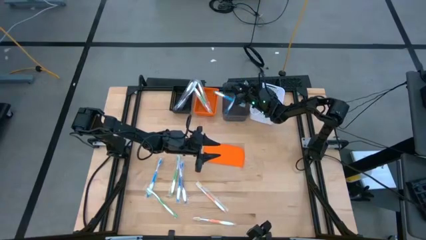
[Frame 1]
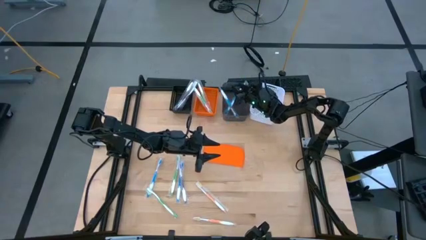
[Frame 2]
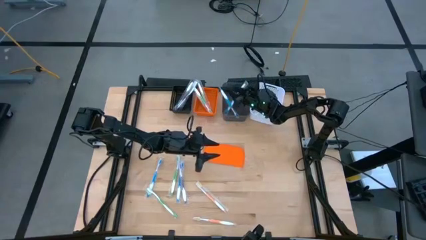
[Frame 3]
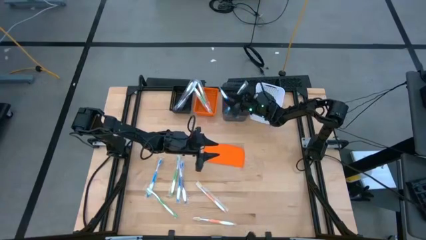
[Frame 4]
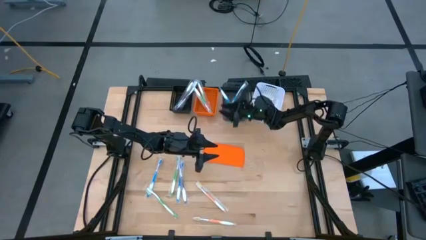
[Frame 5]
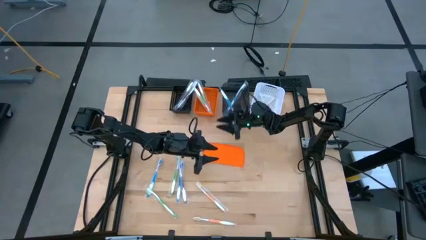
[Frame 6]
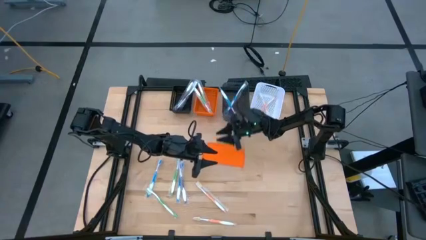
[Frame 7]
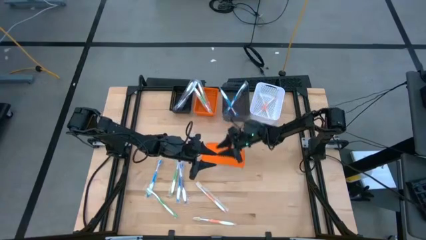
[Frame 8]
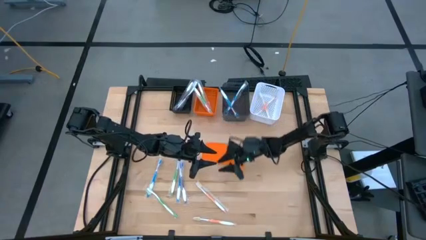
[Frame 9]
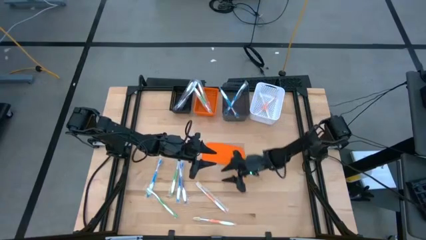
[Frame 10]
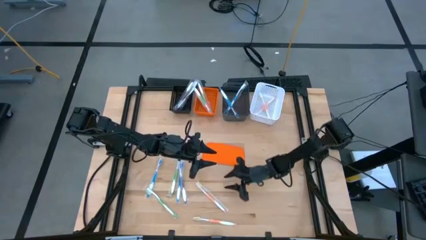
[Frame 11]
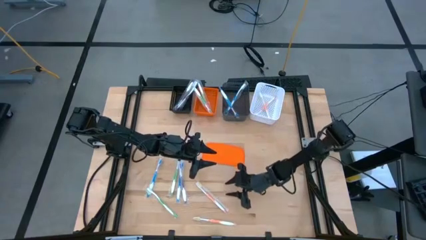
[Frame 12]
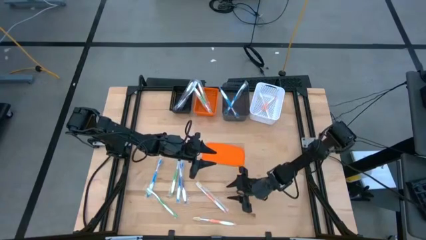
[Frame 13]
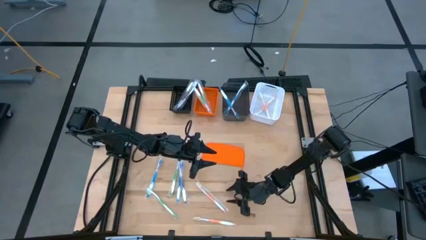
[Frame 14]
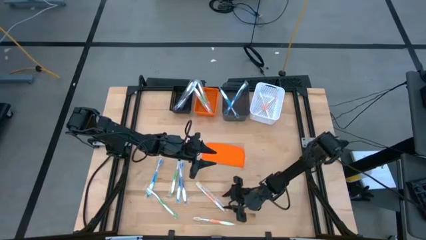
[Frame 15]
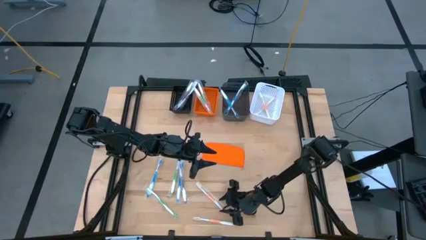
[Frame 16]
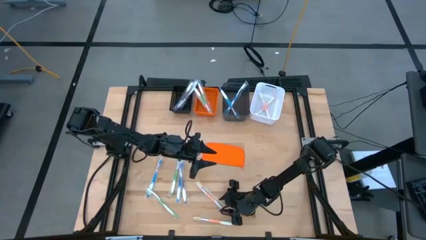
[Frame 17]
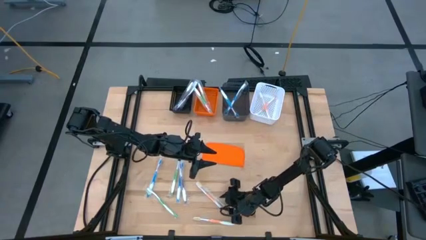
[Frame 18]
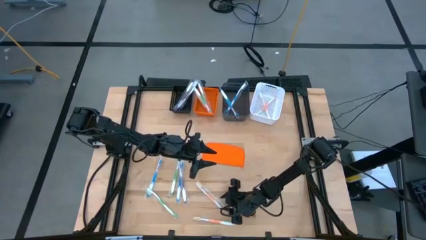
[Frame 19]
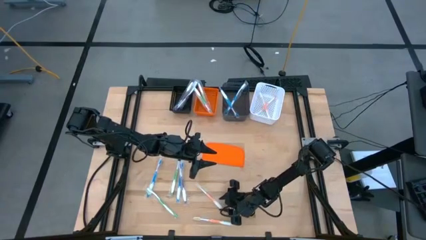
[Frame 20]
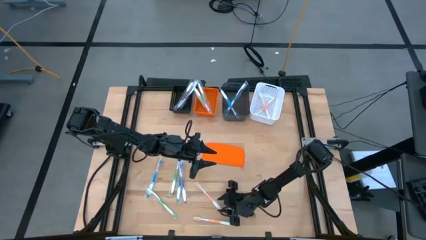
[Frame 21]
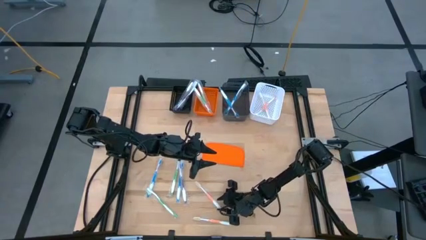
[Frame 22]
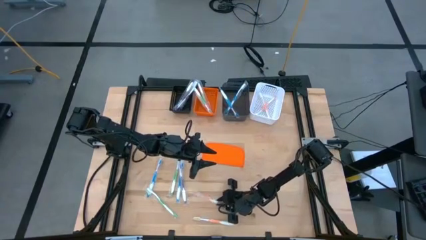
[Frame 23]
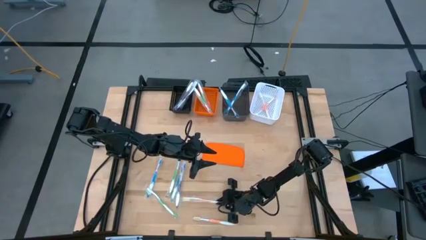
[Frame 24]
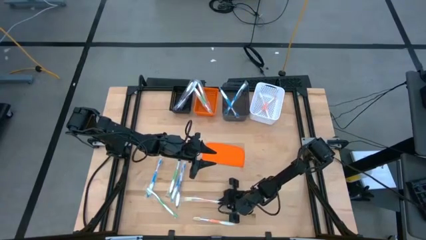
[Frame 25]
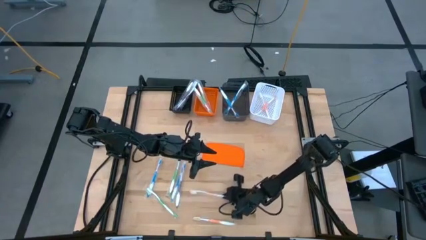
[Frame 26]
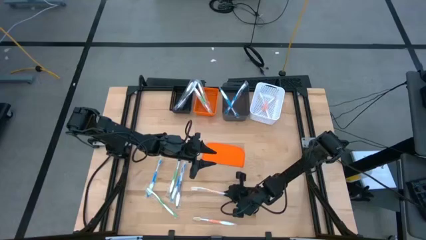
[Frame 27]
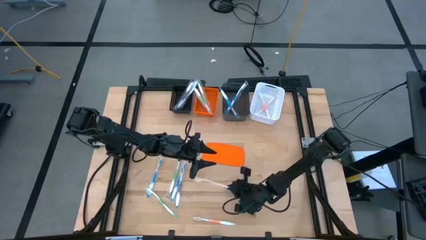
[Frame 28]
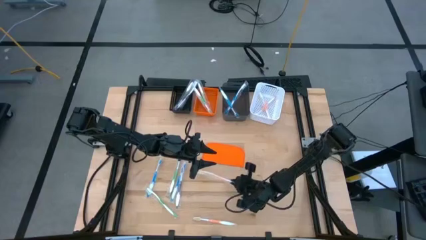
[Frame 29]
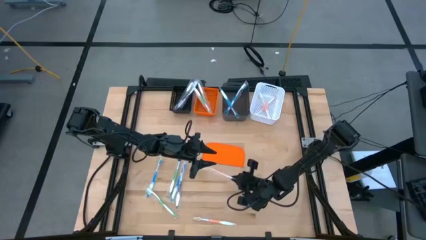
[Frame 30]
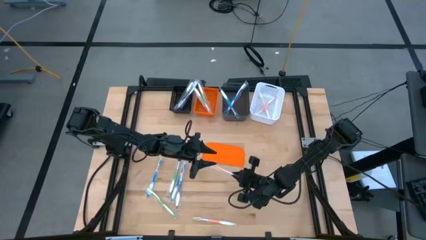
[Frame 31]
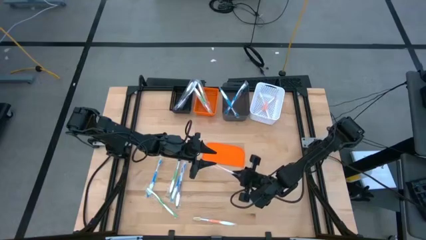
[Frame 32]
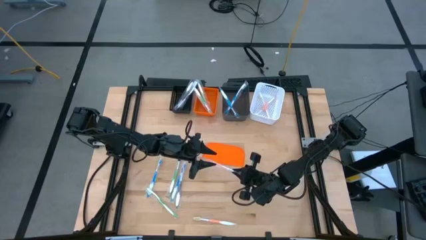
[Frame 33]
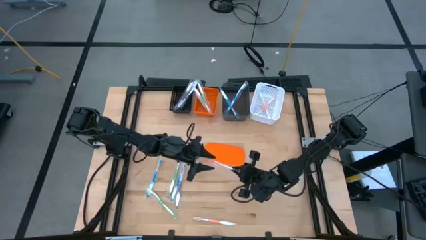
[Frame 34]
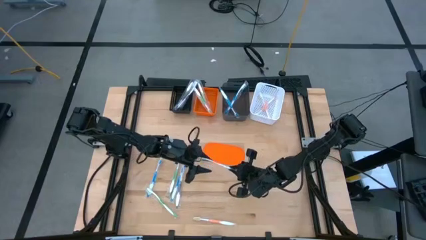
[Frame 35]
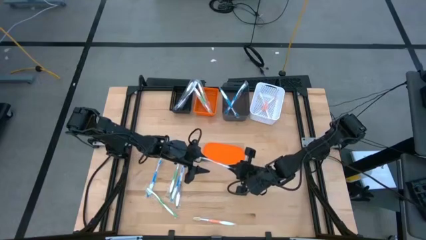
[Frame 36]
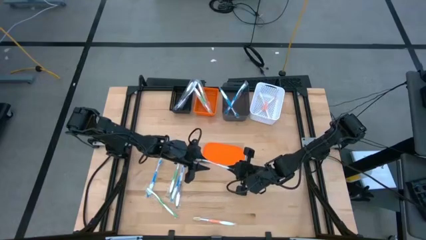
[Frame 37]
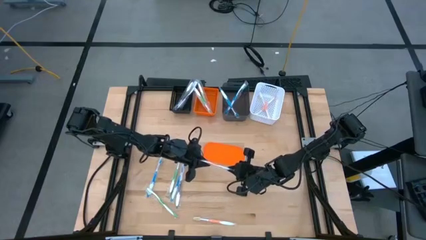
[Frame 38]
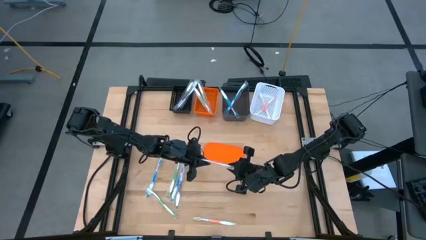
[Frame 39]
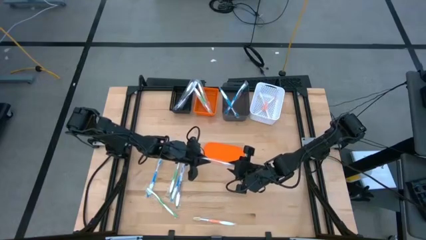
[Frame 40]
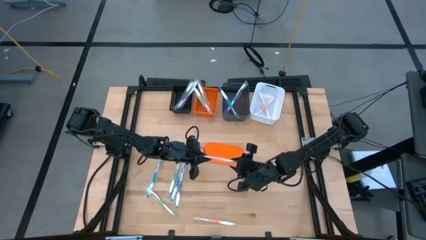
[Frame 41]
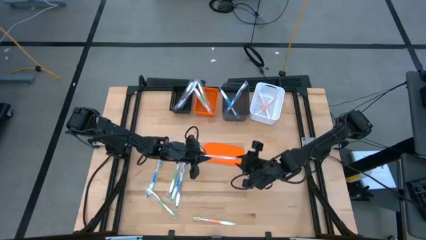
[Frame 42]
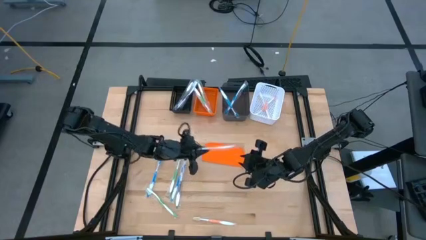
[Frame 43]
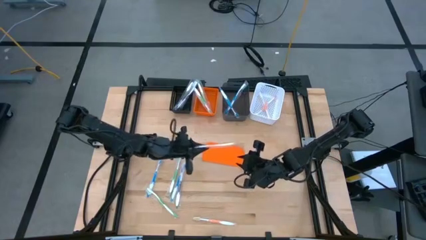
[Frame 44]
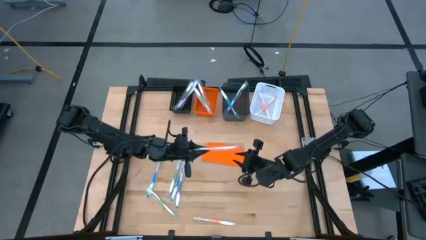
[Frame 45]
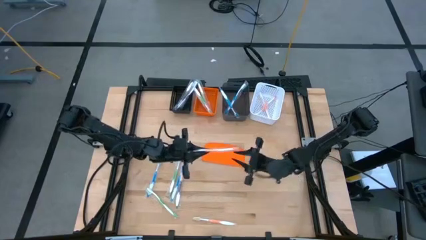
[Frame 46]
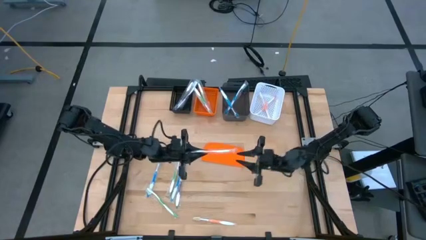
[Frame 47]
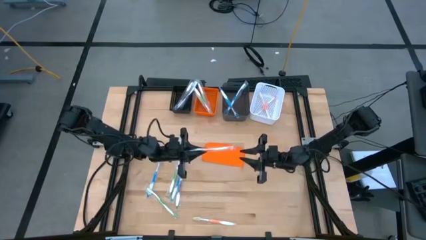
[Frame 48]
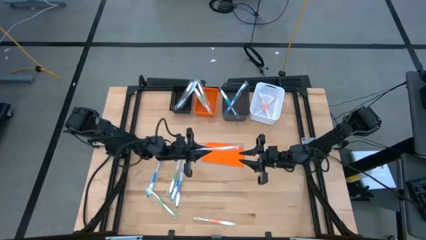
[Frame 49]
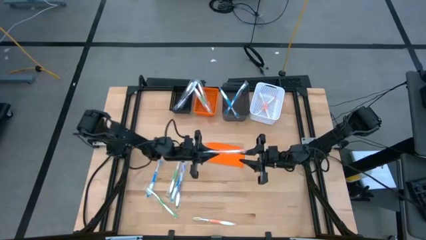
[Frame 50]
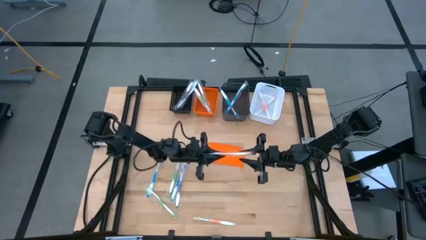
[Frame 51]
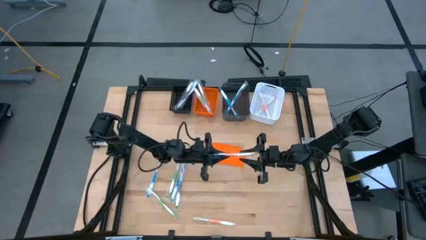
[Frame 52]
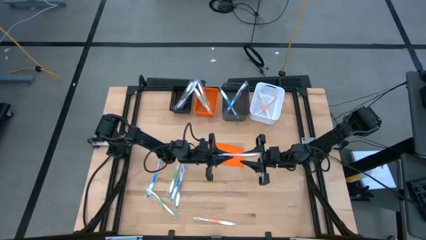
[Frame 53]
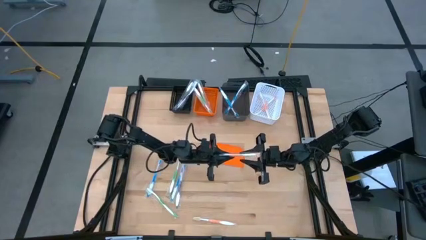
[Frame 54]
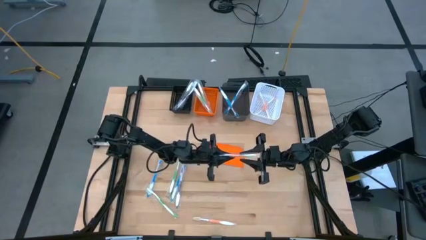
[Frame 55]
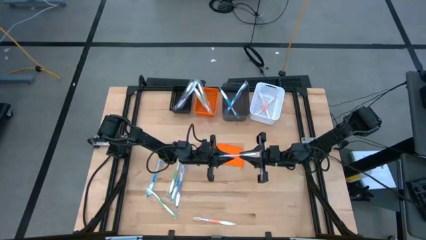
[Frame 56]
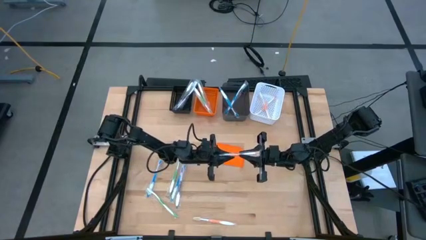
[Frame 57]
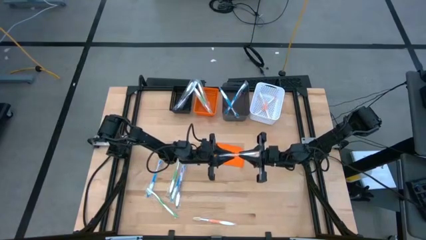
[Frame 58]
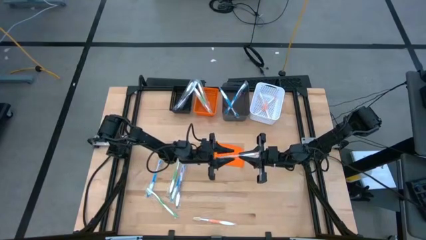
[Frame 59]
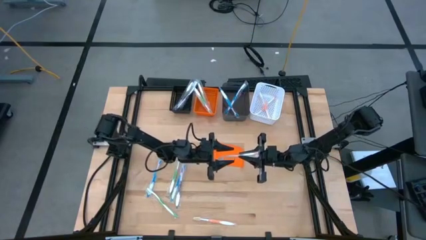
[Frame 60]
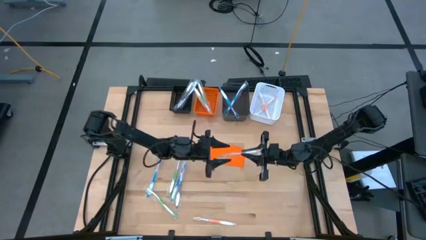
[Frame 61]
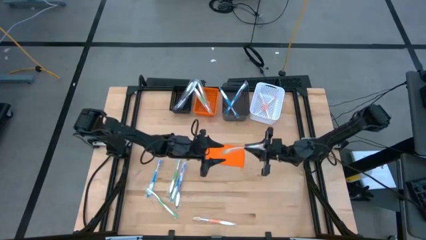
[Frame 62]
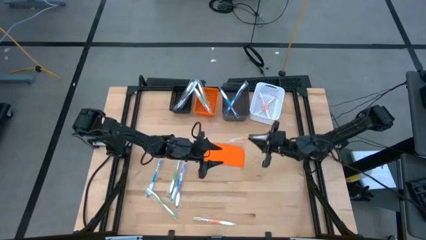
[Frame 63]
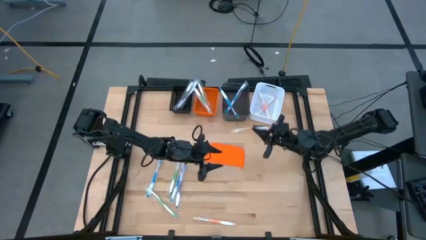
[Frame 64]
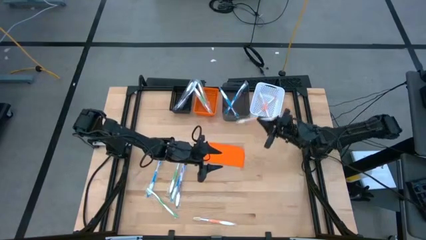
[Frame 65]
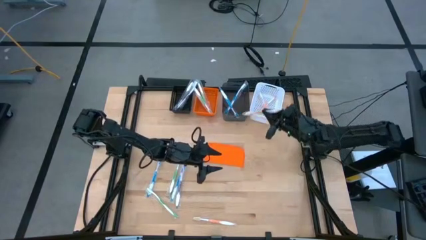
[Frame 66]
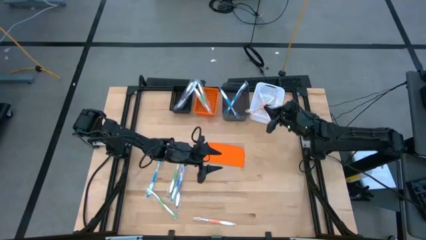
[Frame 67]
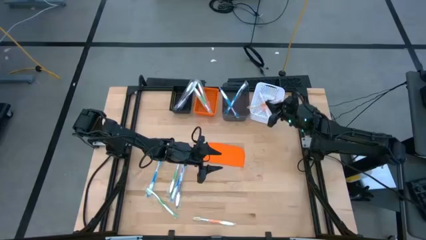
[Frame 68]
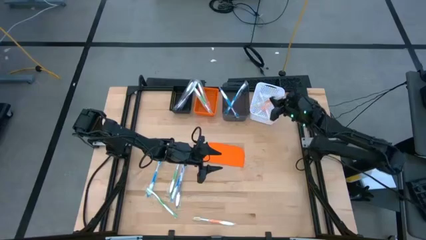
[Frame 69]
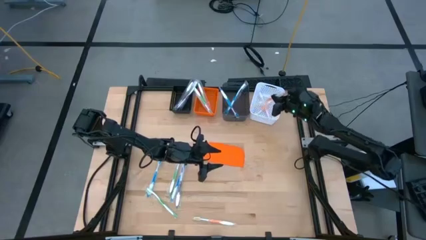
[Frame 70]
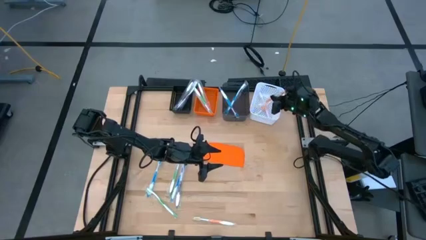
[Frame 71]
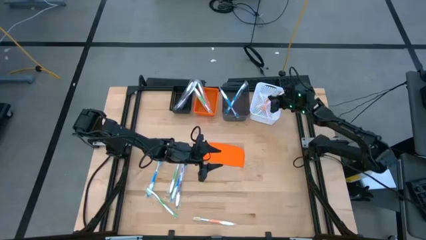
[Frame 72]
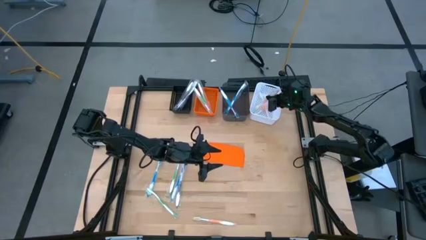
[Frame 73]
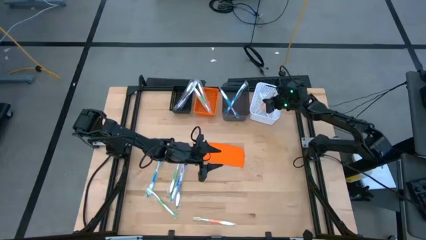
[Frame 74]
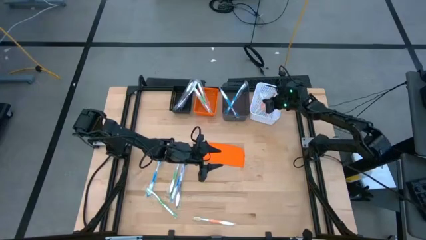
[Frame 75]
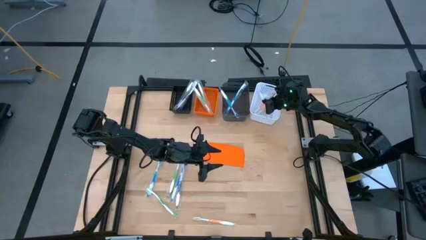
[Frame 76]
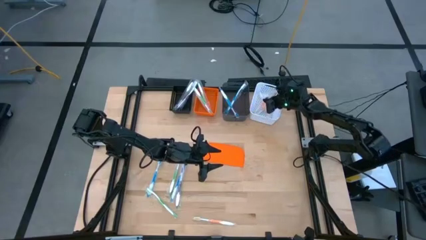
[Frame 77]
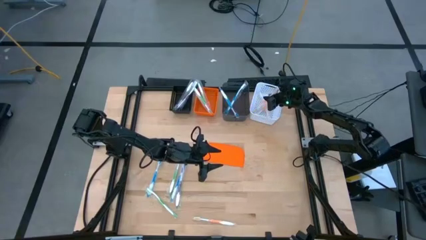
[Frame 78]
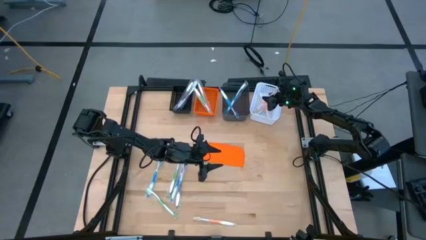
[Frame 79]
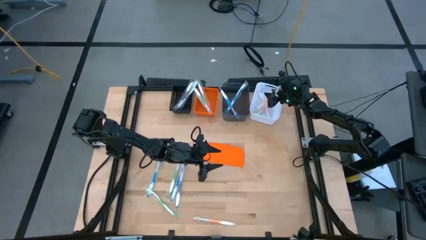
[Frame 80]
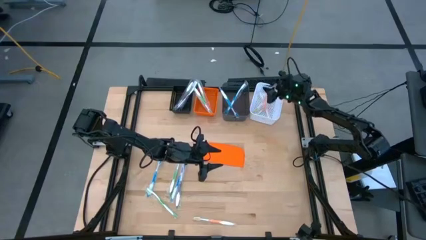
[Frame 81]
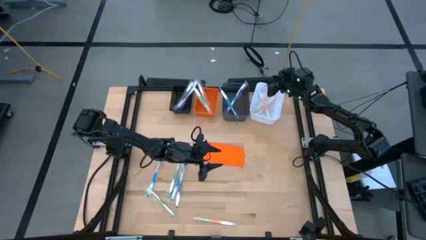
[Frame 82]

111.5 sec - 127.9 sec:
Task: Pick & Place Toothbrushes
Put the orange toothbrush into the white bin
